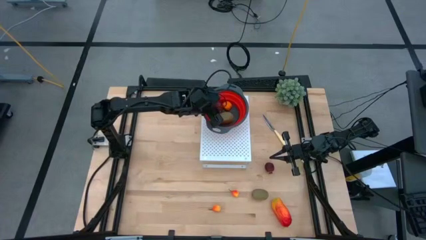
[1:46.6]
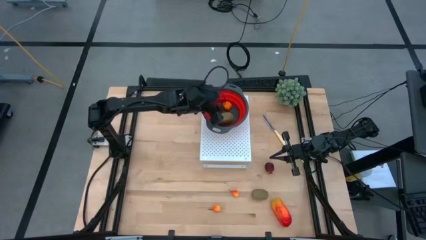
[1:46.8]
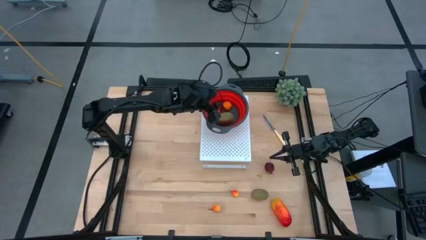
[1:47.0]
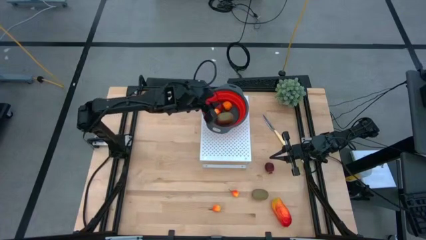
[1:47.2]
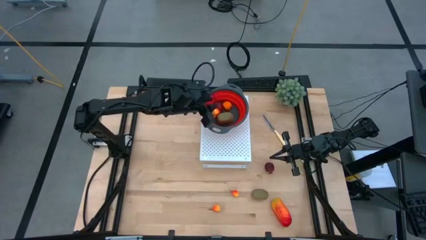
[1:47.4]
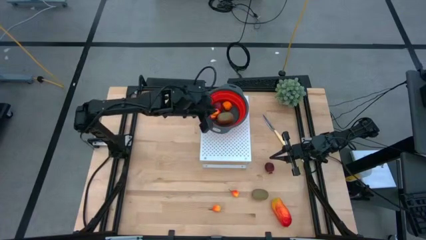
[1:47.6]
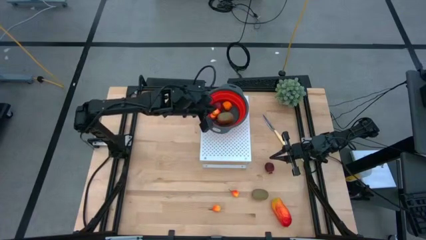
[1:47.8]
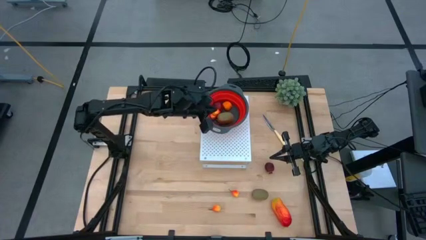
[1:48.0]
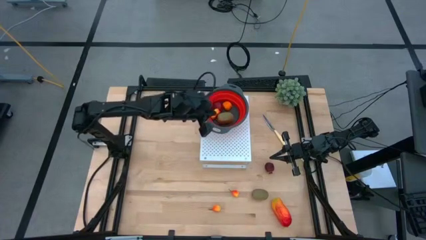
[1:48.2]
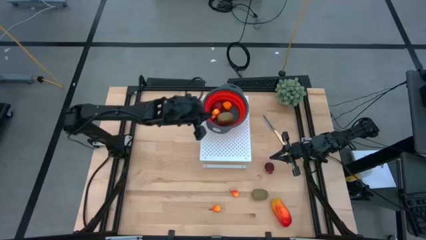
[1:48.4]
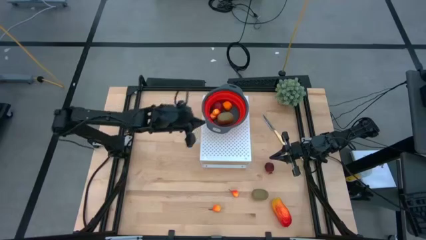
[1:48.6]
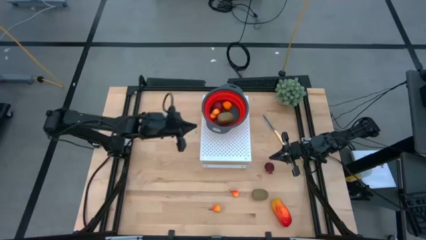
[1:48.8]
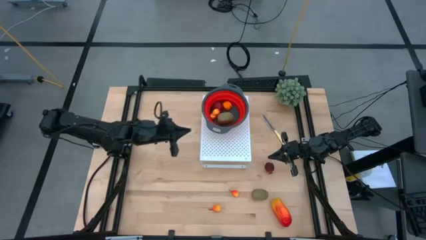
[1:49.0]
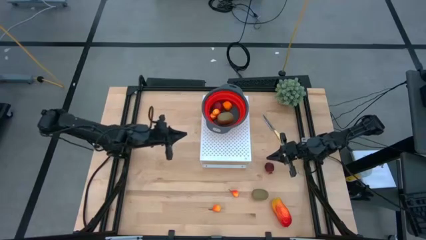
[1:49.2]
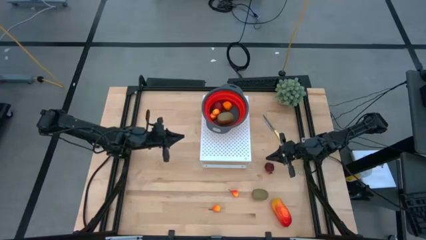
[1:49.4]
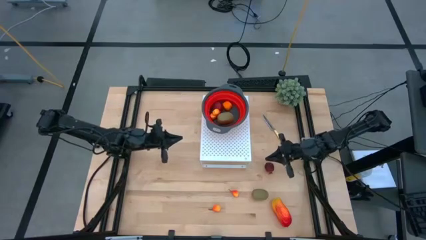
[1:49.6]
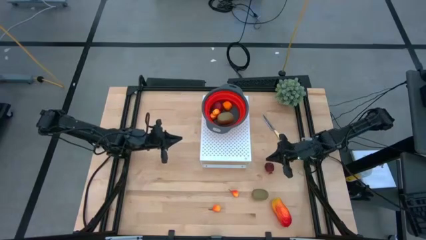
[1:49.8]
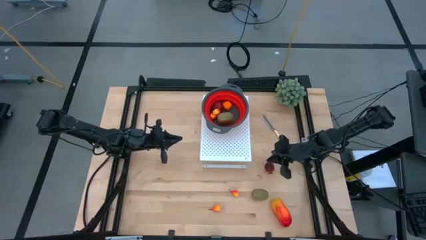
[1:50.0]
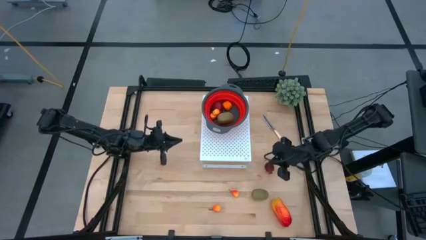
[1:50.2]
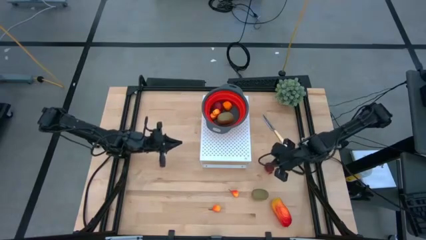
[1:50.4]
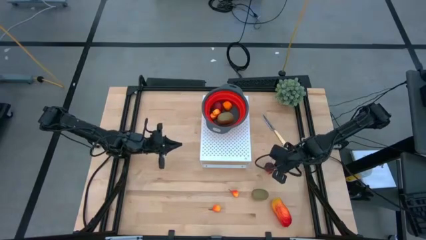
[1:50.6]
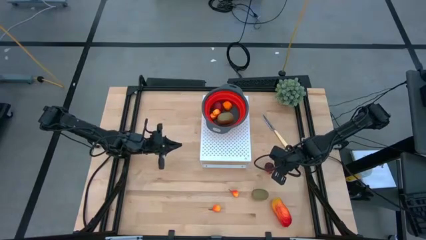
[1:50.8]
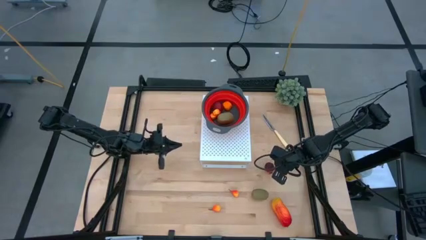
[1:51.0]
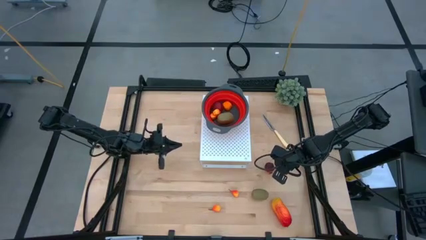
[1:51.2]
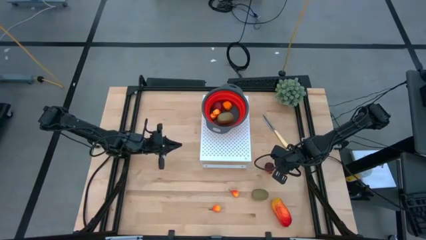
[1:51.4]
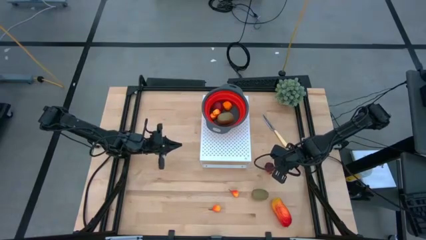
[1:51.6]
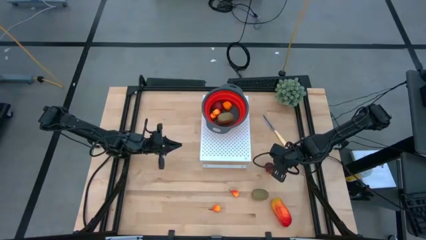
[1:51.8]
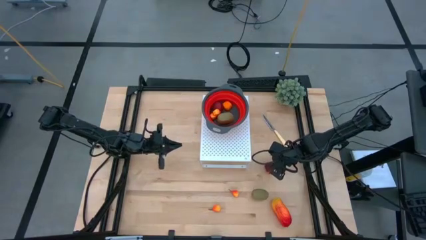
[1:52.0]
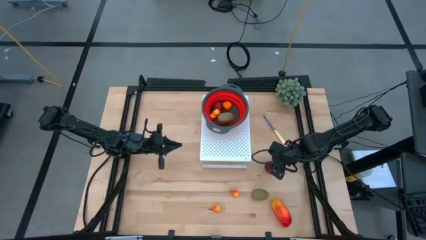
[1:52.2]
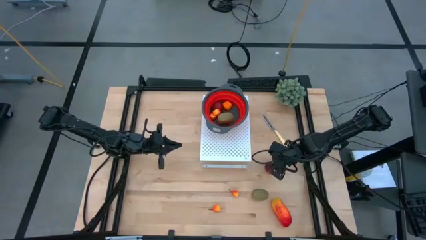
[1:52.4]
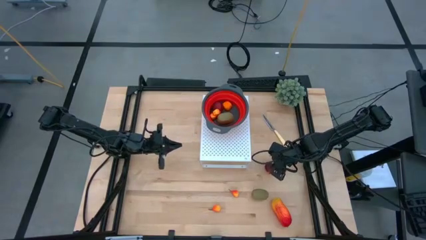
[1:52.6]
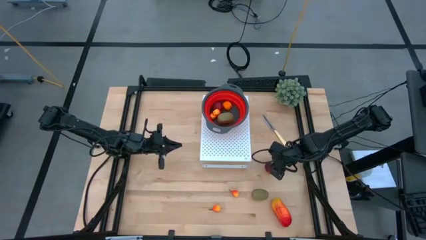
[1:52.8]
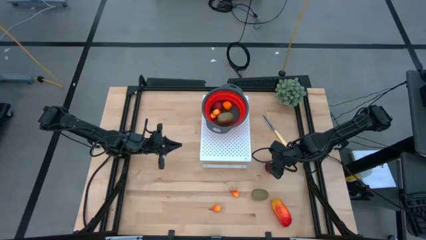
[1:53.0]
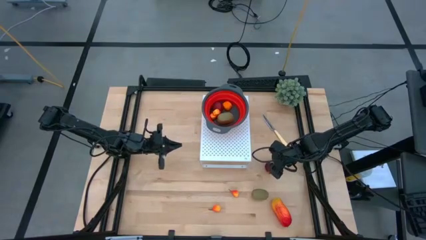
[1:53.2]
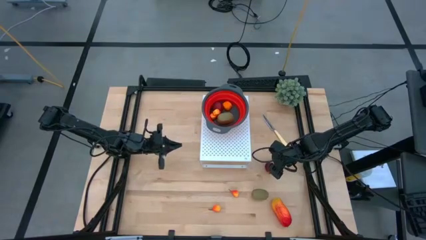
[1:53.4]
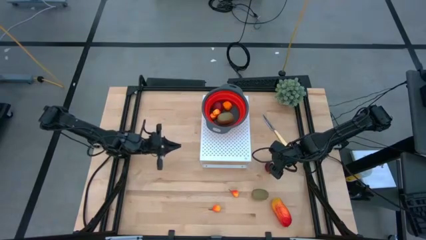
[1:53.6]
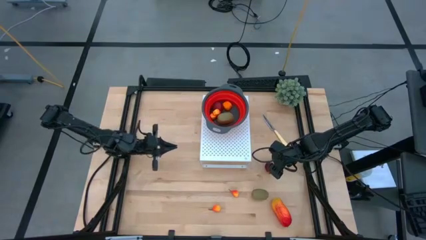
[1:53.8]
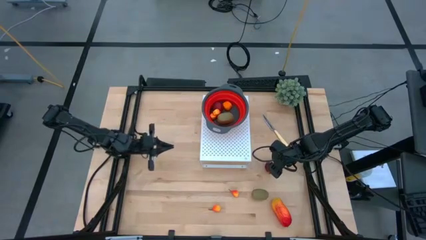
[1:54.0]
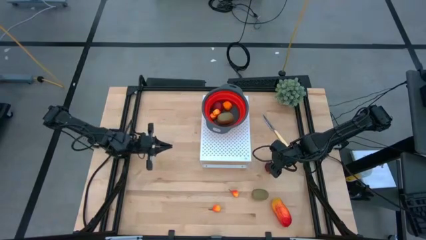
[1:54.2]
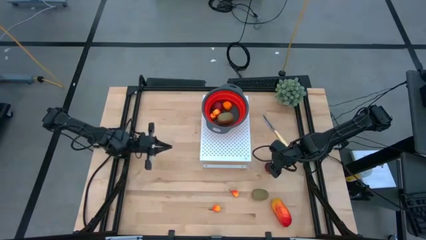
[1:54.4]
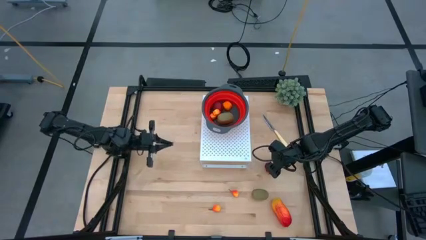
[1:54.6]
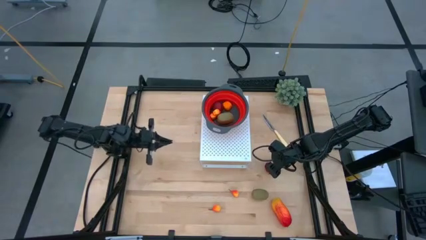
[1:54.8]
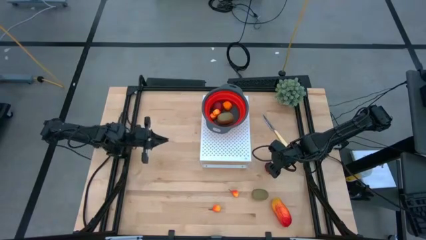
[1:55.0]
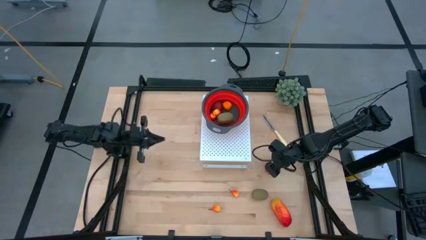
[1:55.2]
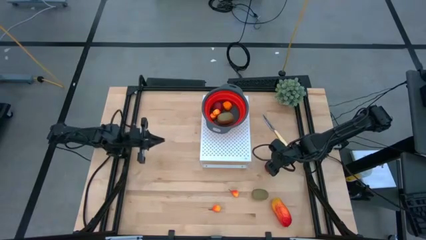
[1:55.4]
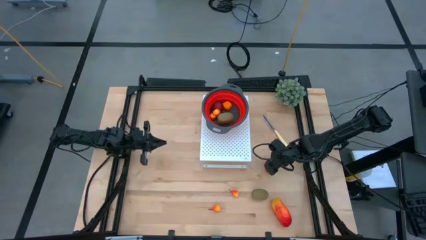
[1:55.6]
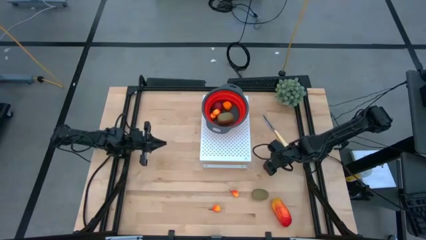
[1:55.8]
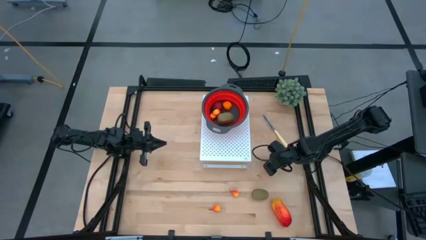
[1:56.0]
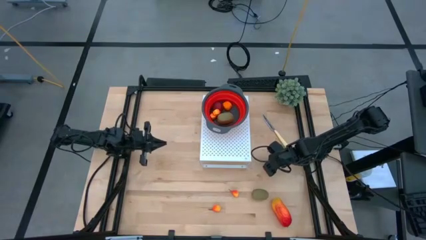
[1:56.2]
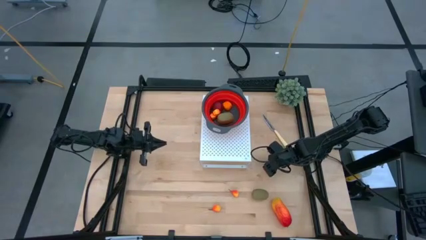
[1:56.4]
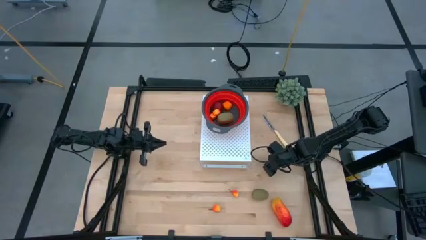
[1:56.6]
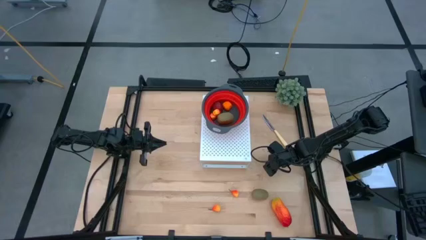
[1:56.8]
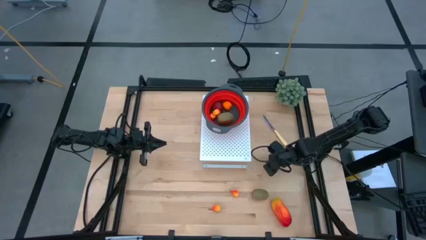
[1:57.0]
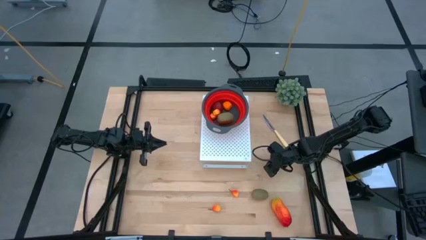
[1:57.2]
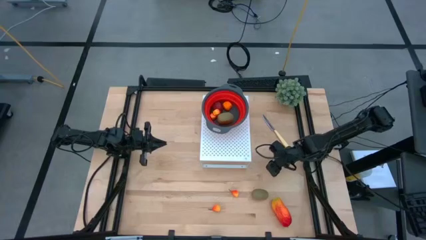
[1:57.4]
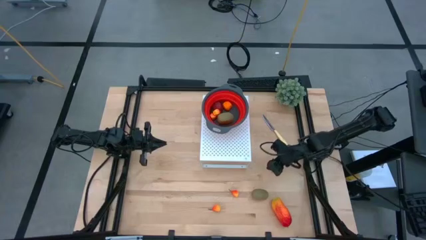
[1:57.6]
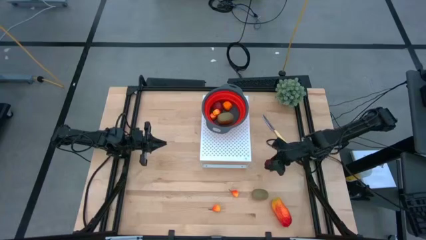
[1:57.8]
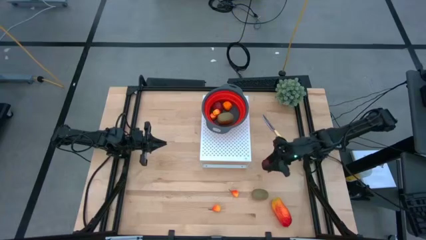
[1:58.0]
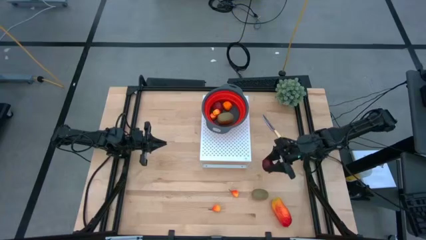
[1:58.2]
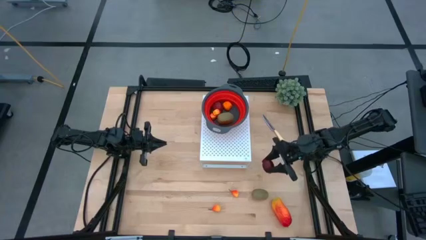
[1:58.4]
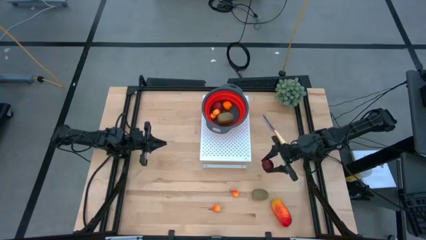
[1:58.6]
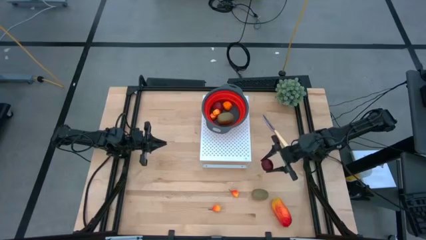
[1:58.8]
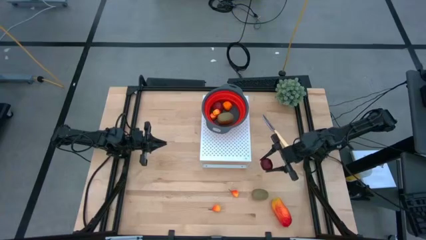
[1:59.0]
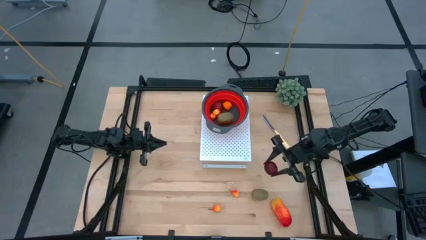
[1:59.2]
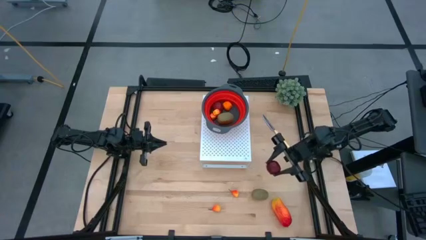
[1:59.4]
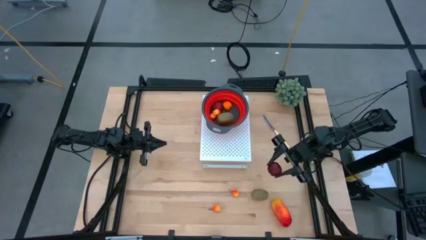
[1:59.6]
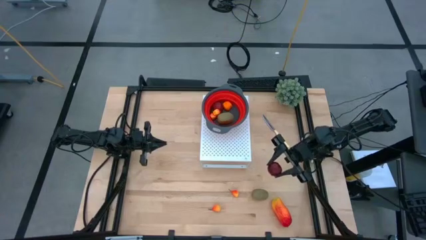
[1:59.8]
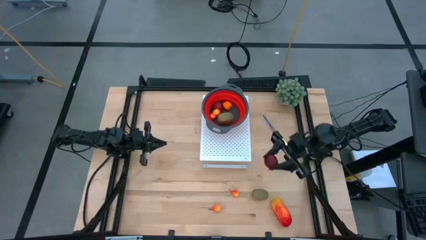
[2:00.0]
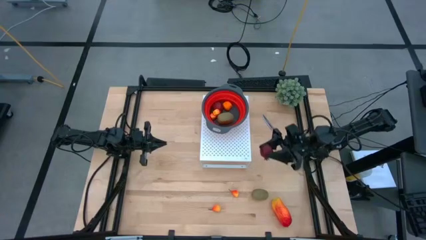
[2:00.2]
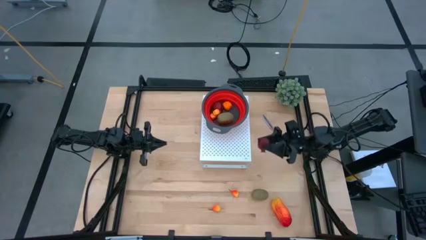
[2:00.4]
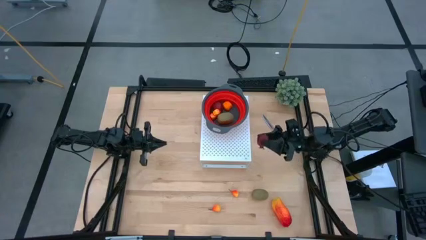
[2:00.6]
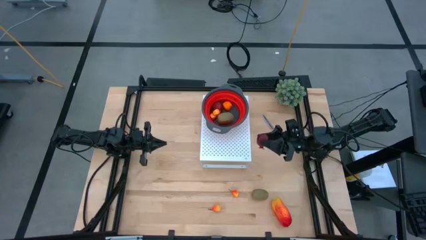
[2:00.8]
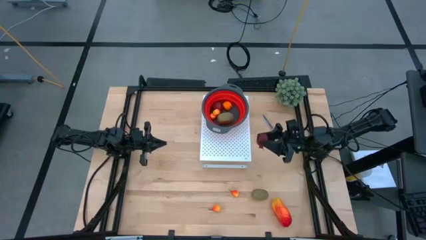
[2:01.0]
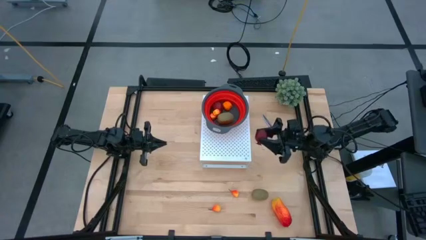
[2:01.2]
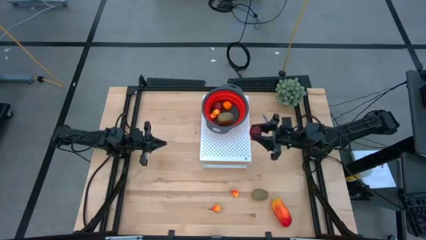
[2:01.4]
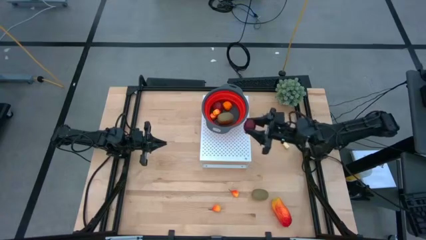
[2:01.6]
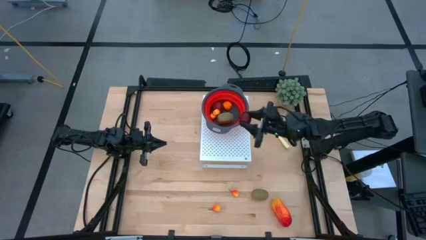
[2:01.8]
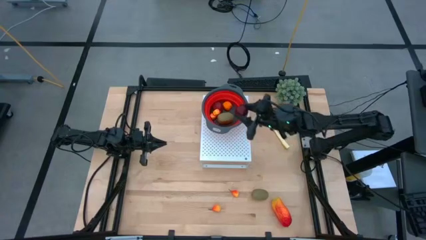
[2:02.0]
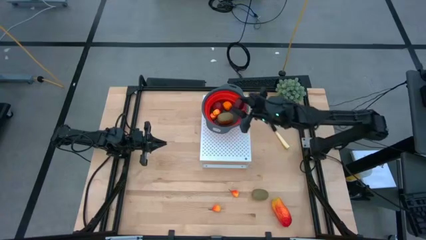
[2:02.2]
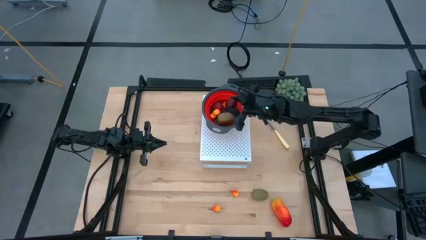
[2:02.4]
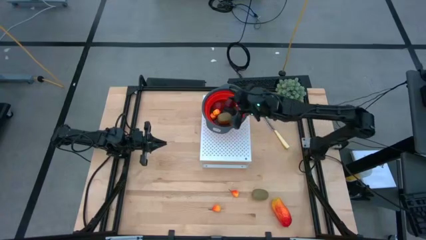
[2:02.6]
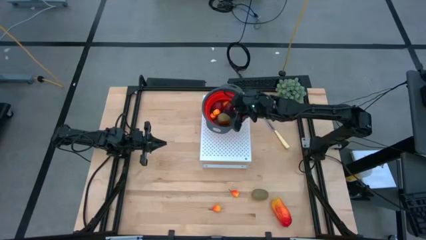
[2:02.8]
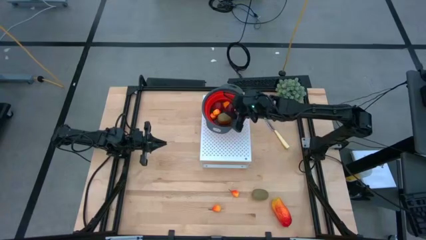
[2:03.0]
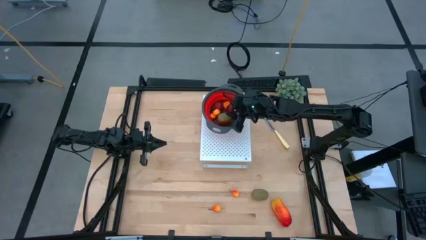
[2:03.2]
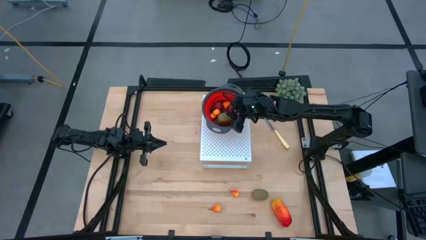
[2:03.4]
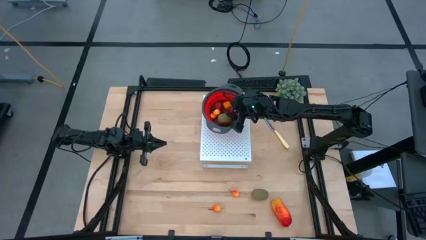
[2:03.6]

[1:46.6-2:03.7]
Task: Pick & Place Fruit
Put the red pomegranate into the red strainer bowl
